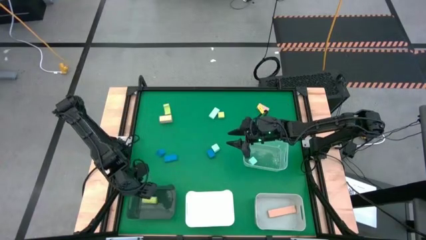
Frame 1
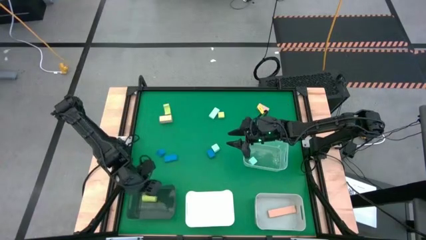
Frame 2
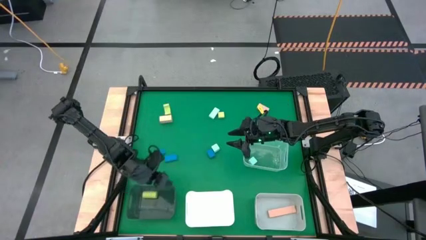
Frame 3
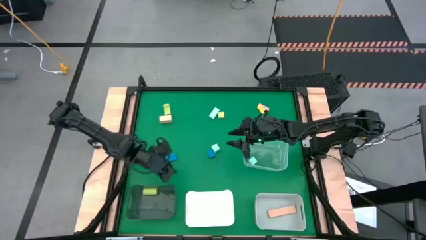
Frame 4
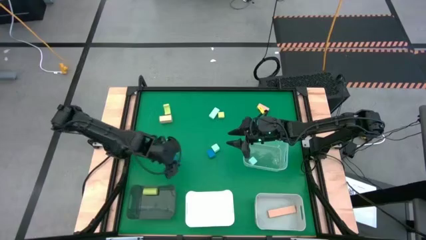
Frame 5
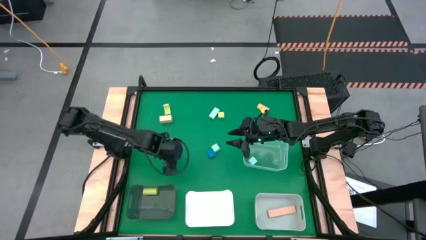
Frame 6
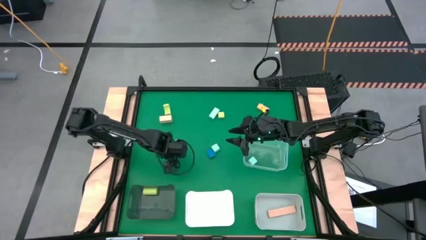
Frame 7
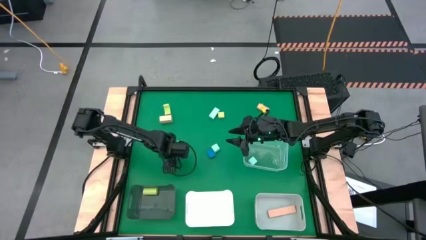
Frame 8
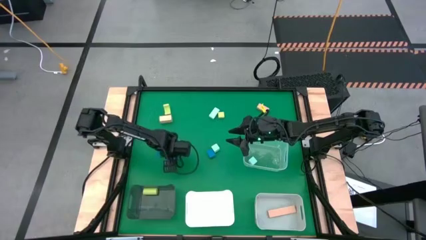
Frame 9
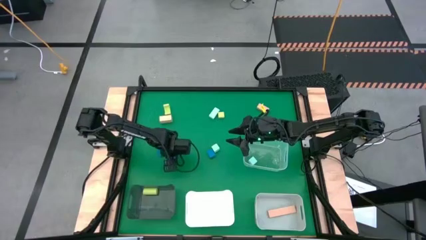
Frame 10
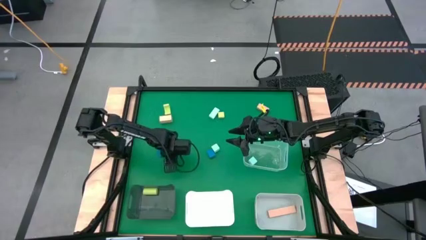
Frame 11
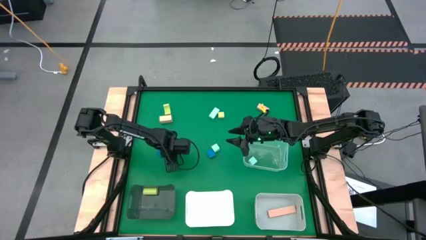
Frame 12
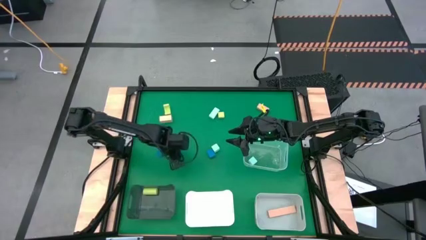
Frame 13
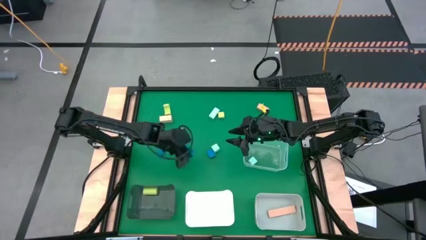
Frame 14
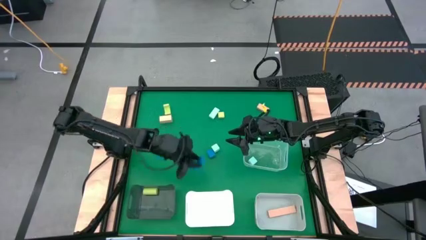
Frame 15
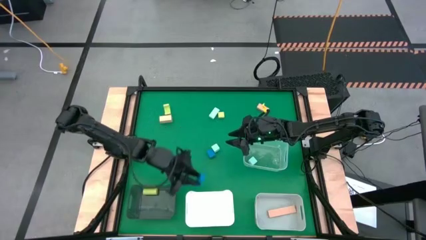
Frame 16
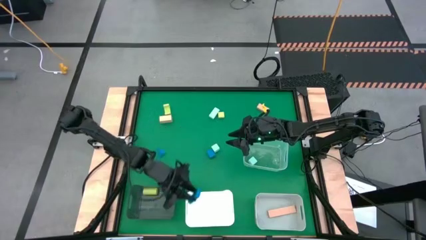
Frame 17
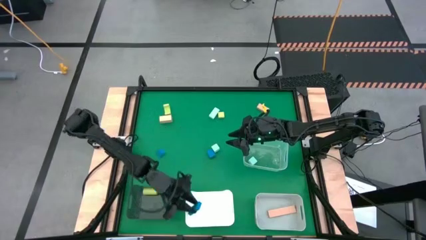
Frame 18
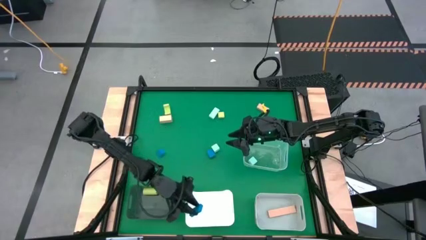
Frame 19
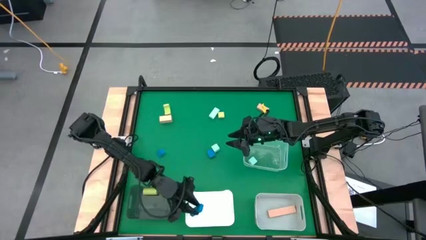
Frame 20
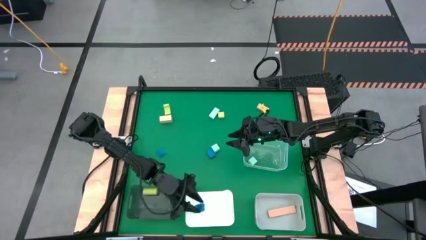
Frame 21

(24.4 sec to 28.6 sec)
Task: Sort & place blocks by color
Put the middle blue block into the white bin

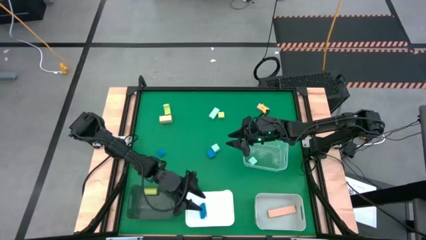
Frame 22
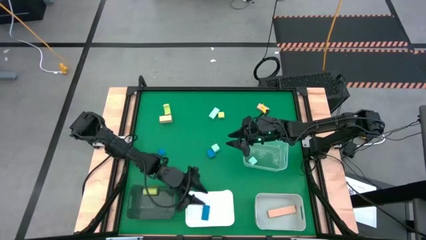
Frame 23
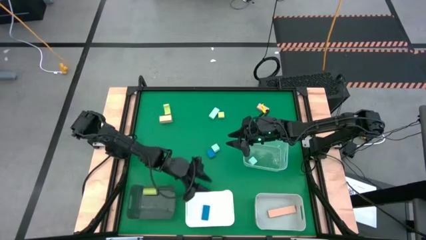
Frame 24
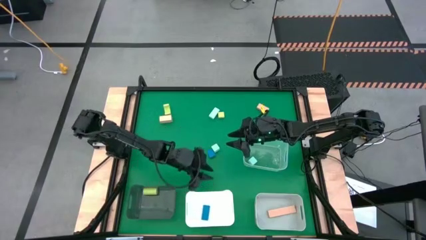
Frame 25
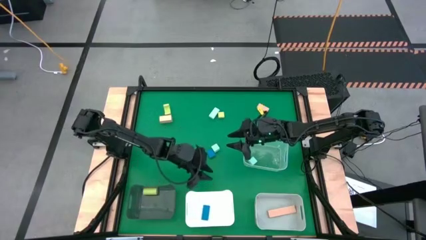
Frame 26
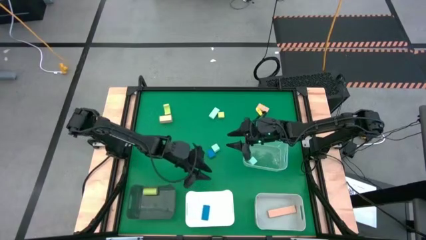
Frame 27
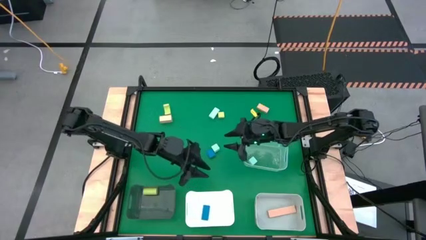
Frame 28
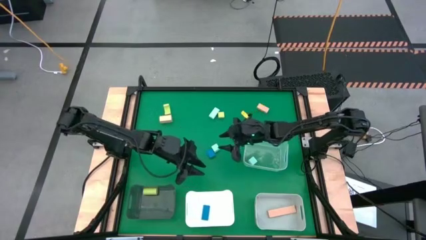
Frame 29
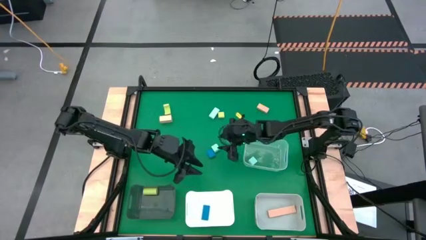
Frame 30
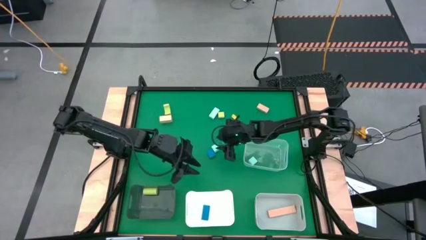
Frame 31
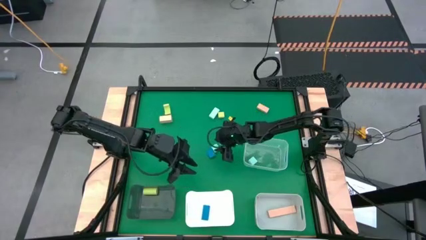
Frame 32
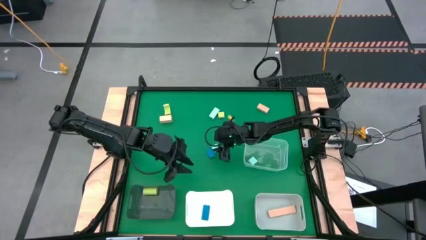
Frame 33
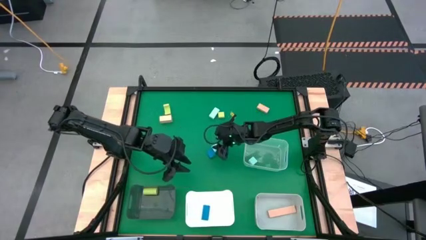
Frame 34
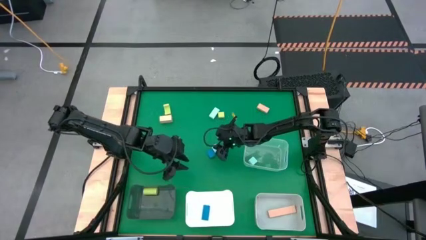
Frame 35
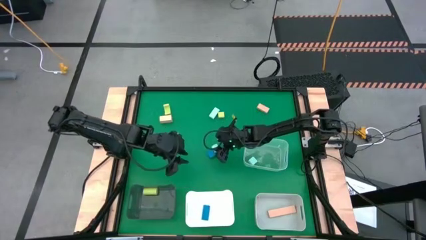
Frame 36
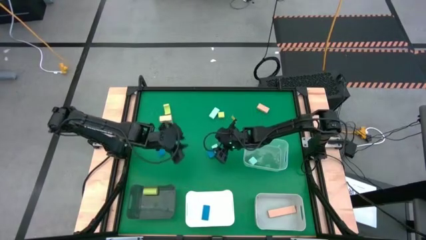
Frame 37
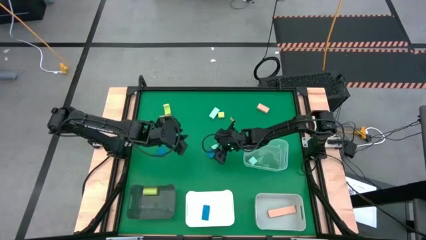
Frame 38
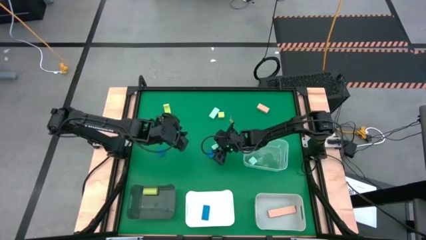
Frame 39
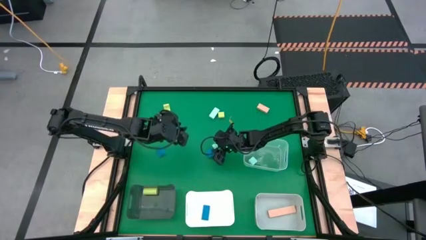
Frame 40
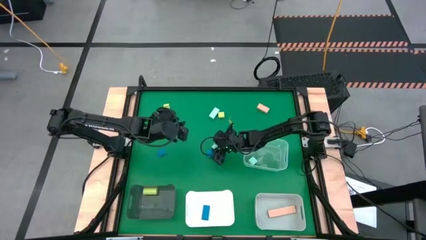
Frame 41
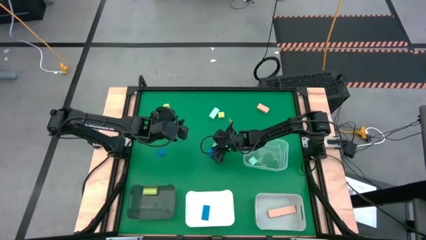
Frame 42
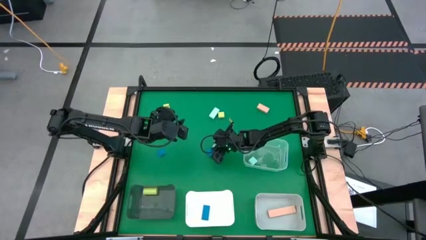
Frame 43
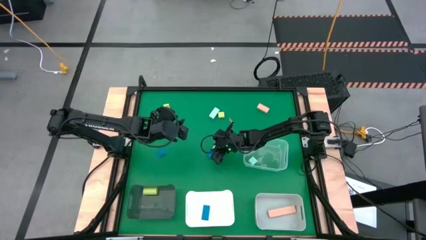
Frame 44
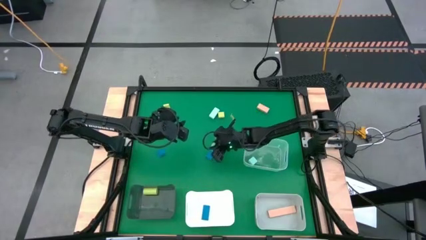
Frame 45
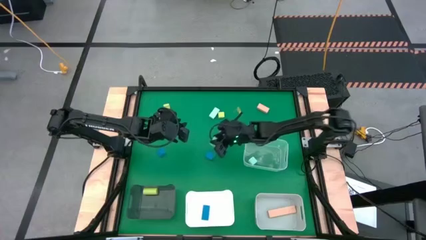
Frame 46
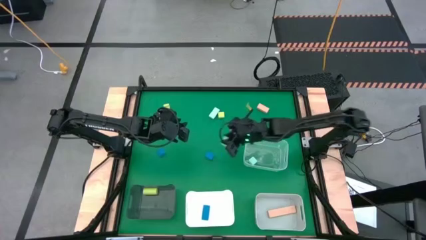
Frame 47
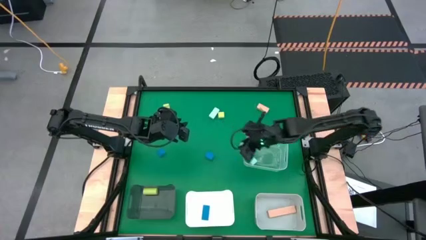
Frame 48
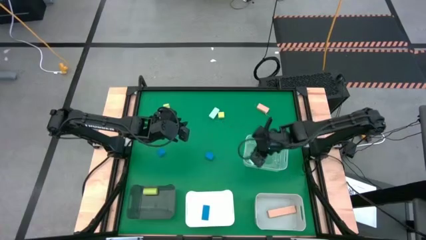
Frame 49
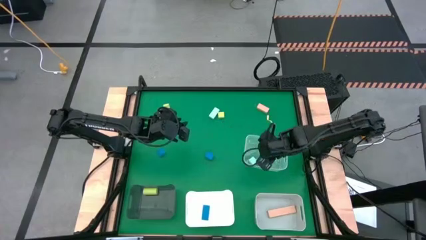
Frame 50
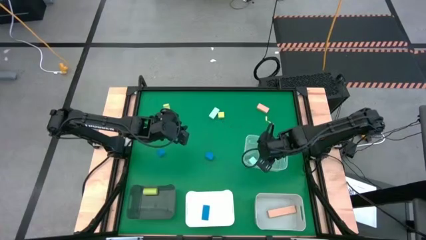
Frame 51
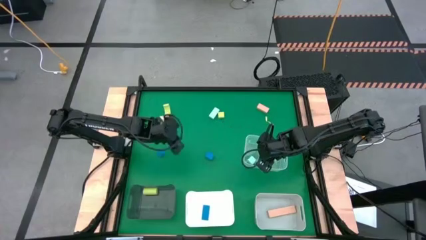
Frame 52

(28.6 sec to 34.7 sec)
Put the bottom light blue block into the transparent bin

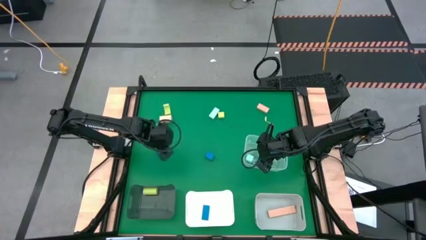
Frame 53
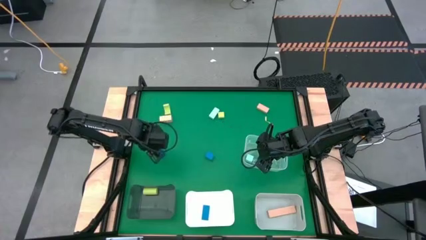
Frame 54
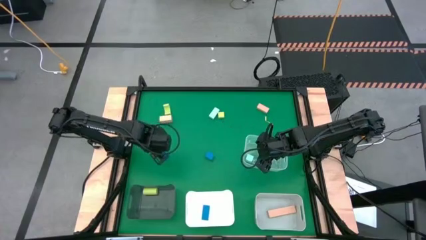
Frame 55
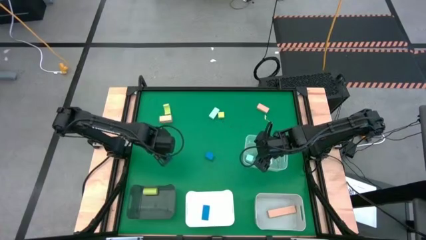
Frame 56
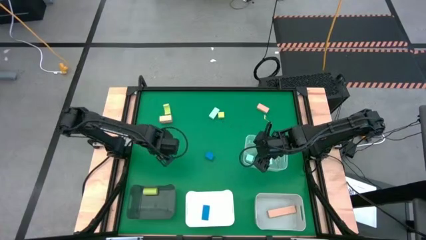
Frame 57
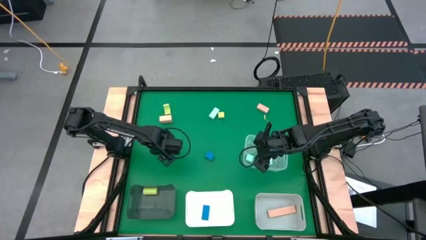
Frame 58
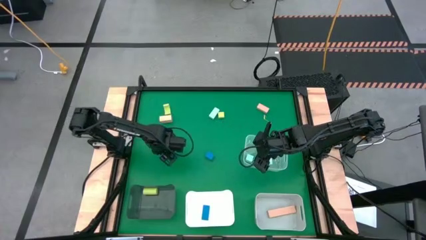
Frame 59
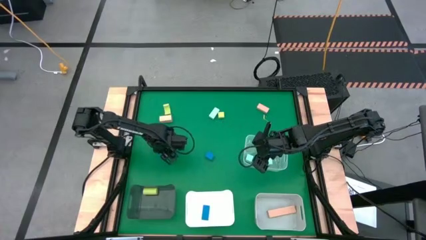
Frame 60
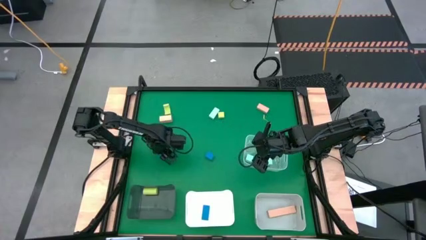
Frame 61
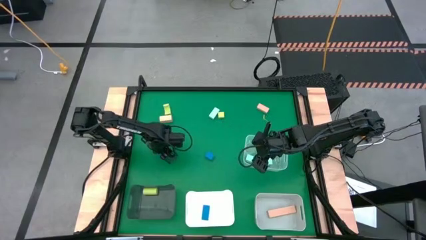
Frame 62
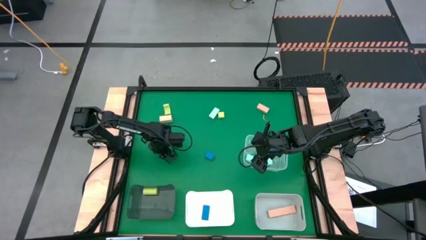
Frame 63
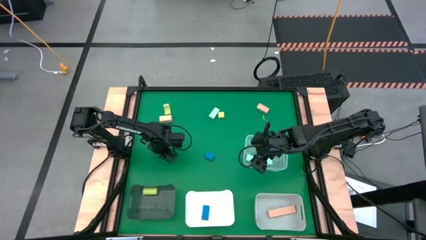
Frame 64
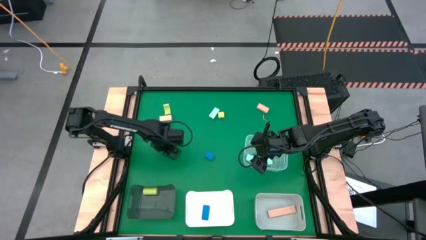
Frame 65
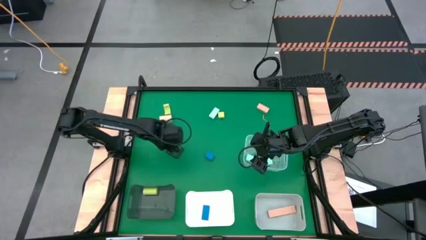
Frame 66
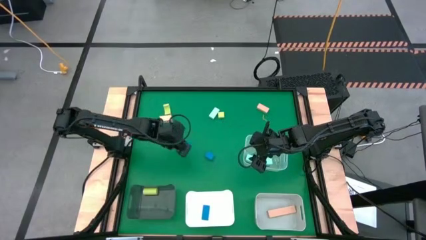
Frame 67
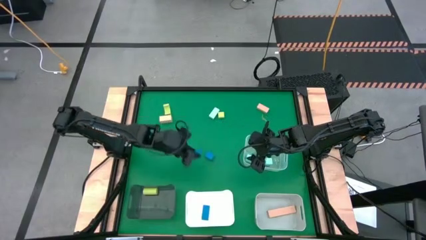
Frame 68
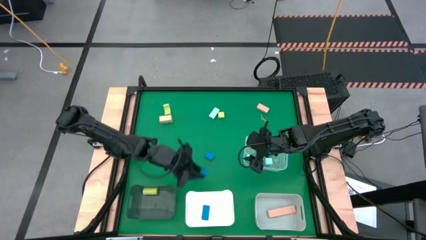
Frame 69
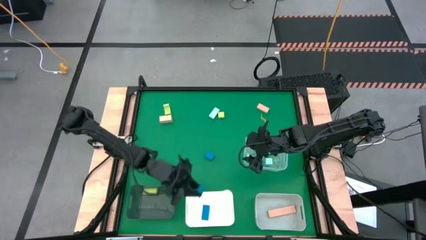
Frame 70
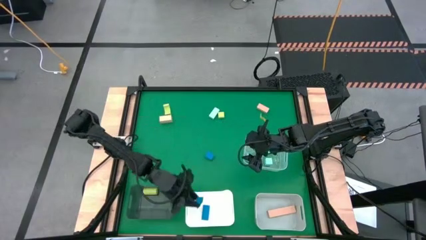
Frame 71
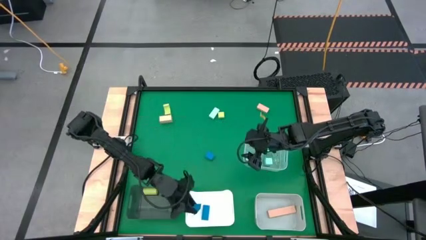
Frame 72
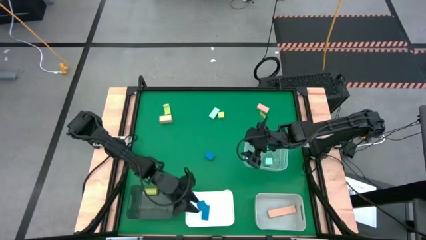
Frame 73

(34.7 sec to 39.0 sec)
Put the left blue block into the white bin

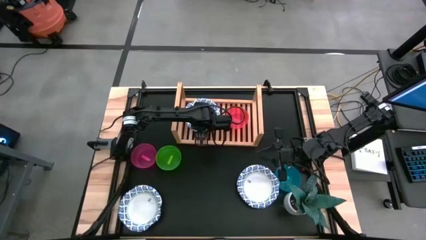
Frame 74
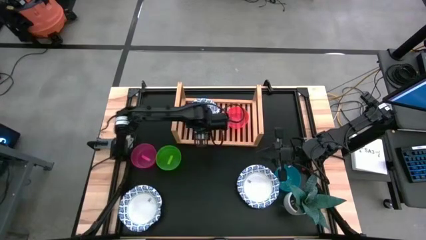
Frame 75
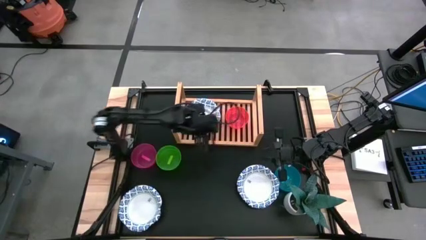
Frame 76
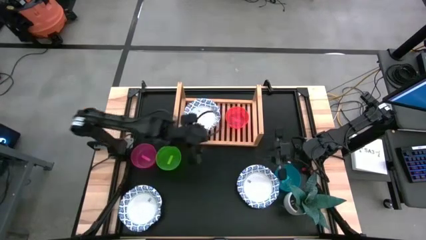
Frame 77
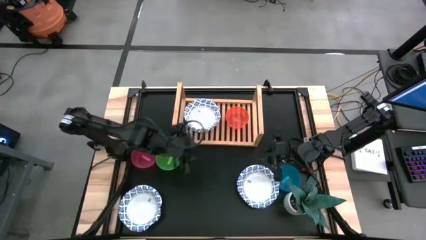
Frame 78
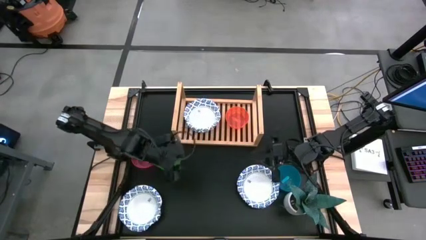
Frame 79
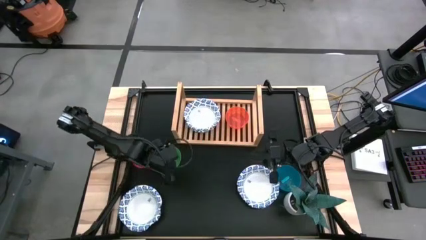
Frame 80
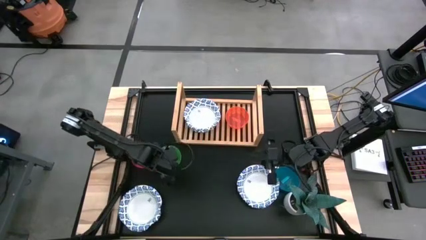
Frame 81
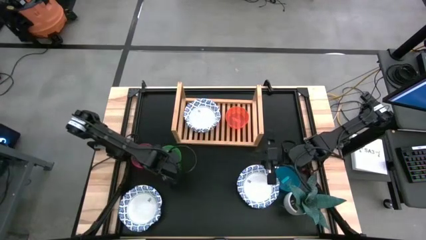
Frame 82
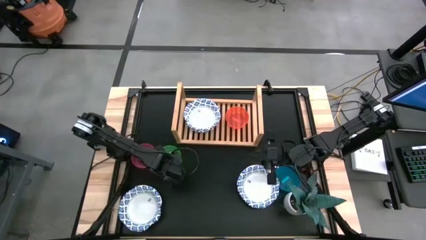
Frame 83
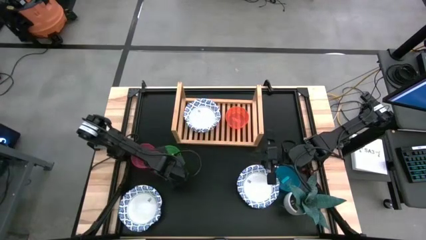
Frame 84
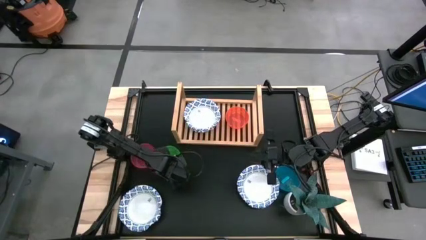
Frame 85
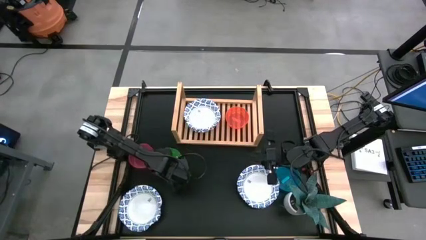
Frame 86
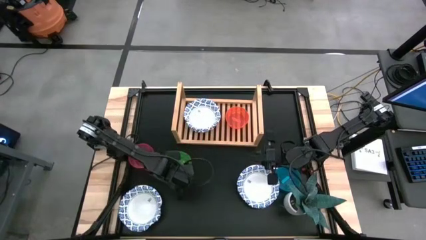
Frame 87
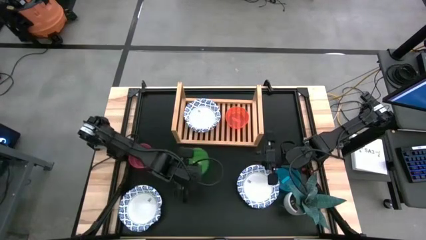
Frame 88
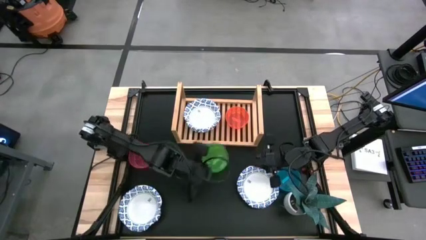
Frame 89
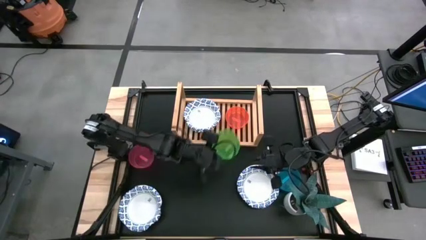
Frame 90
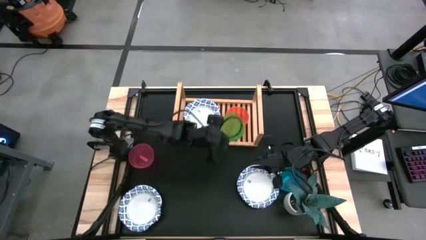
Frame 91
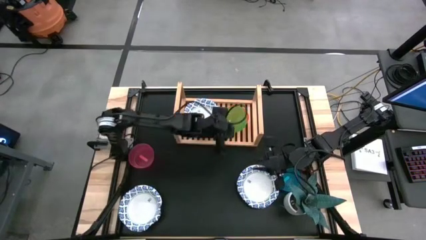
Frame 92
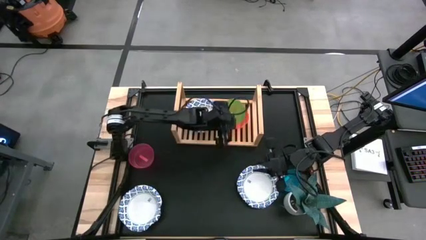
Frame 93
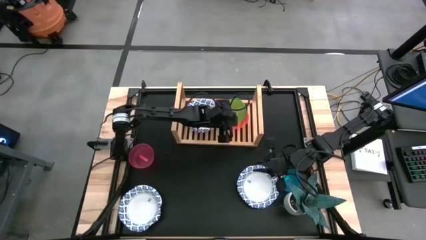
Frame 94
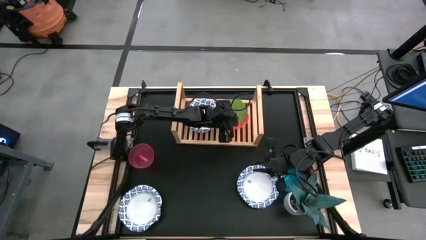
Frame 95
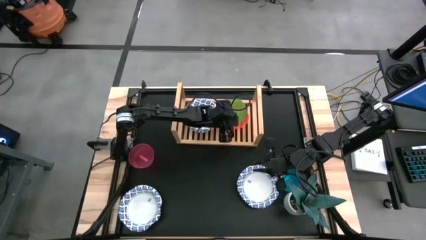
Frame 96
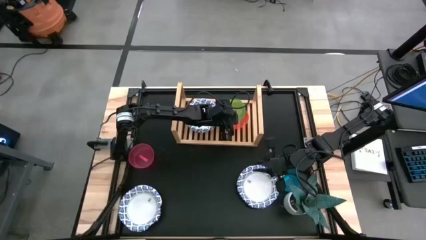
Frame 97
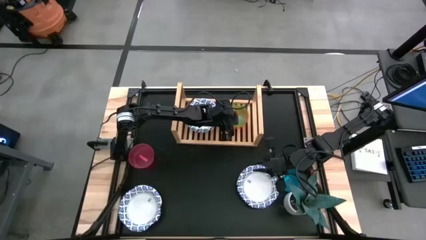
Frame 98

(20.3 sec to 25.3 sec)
Task: Place and stack bowls onto a shelf
Stack the small green bowl on top of the small orange bowl on the shelf
